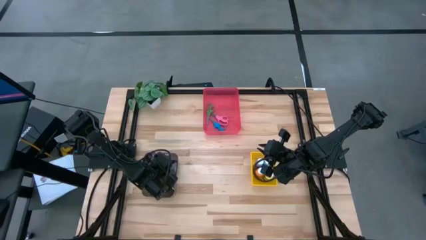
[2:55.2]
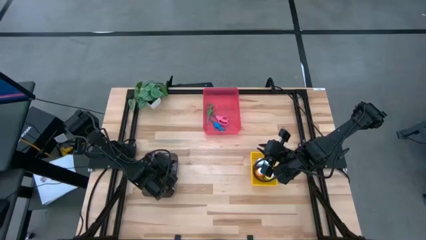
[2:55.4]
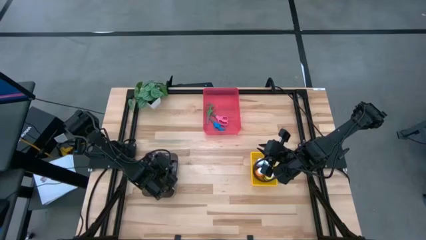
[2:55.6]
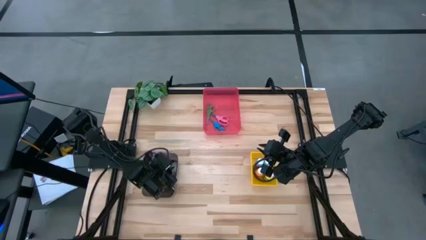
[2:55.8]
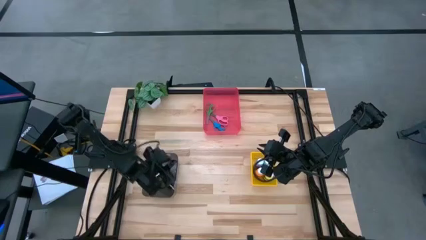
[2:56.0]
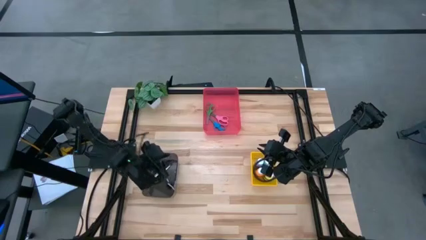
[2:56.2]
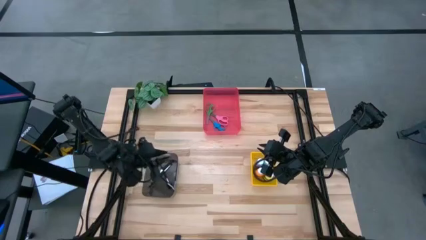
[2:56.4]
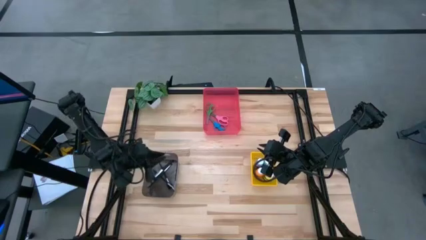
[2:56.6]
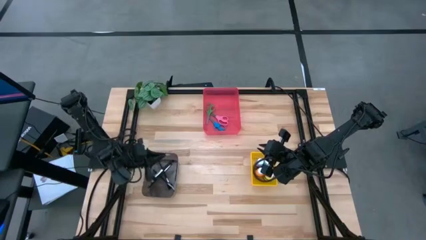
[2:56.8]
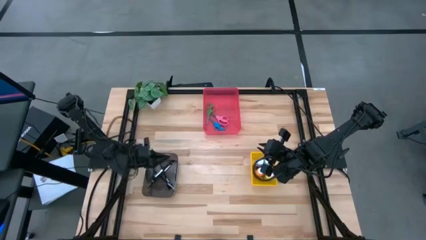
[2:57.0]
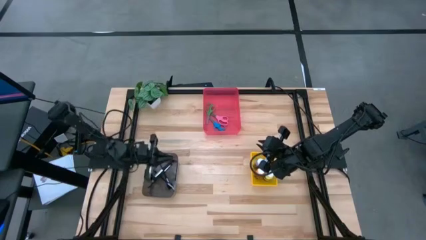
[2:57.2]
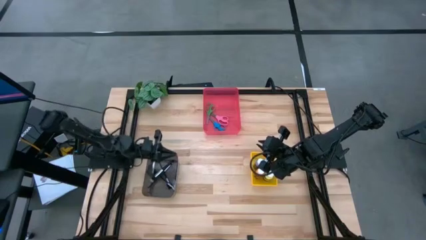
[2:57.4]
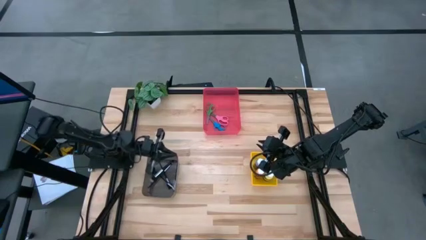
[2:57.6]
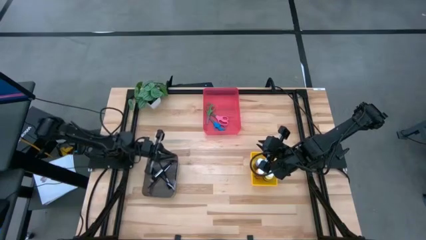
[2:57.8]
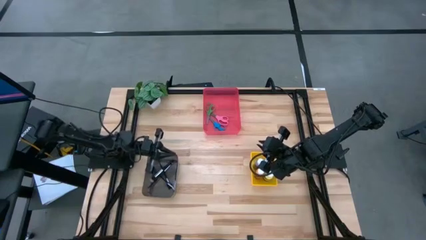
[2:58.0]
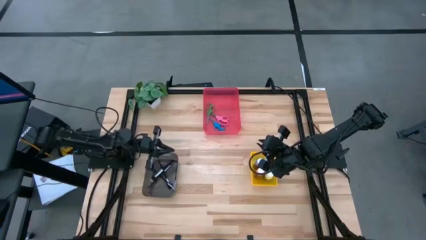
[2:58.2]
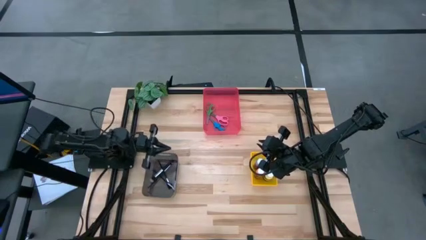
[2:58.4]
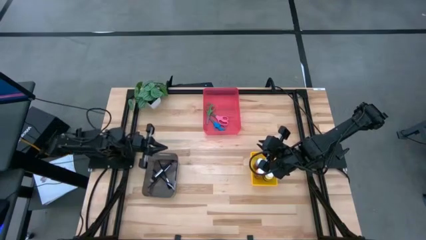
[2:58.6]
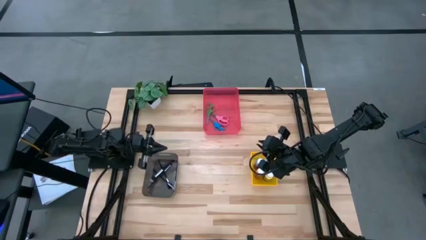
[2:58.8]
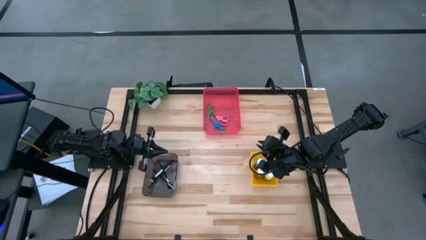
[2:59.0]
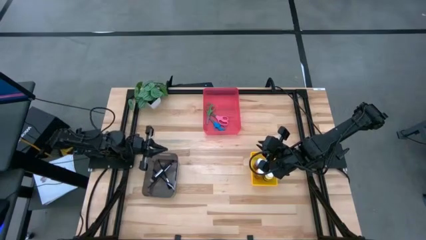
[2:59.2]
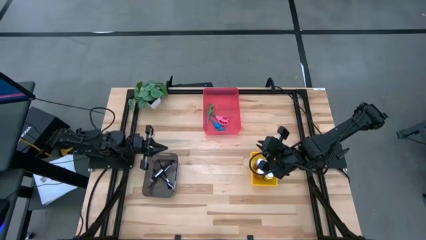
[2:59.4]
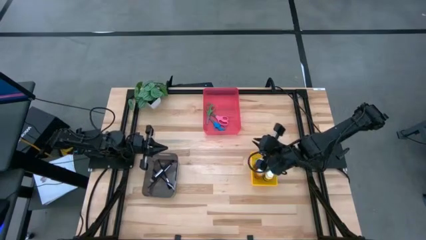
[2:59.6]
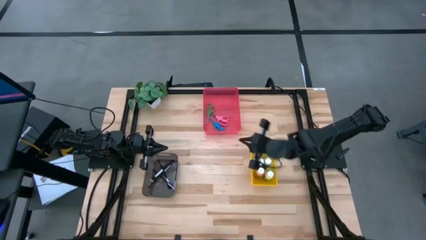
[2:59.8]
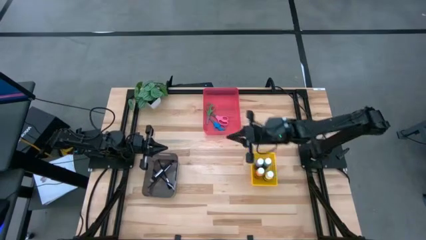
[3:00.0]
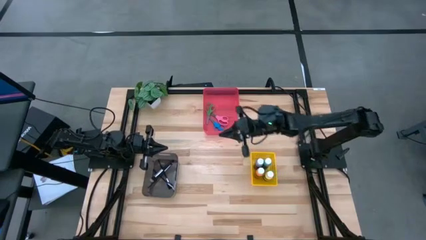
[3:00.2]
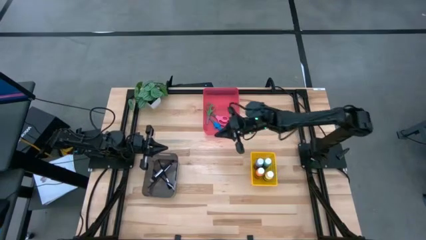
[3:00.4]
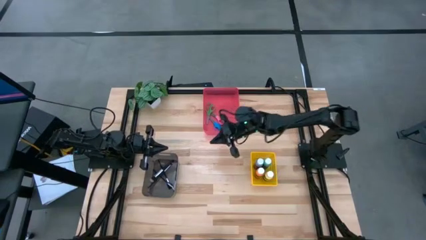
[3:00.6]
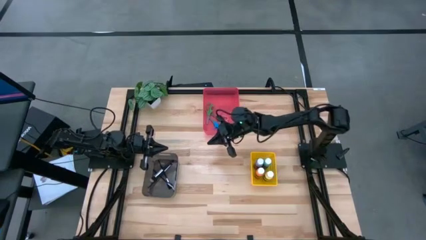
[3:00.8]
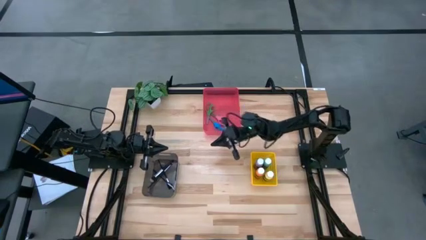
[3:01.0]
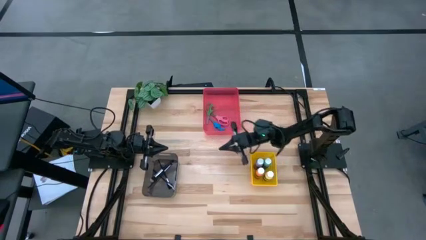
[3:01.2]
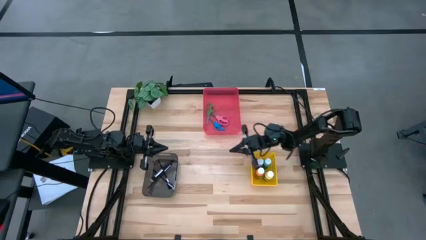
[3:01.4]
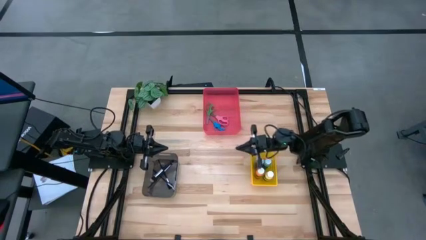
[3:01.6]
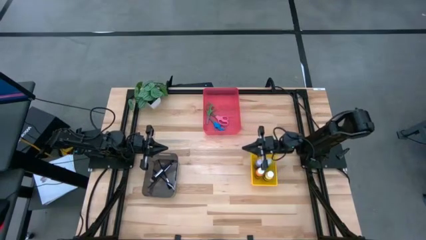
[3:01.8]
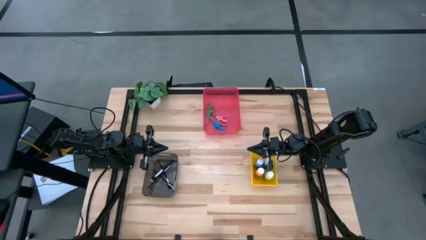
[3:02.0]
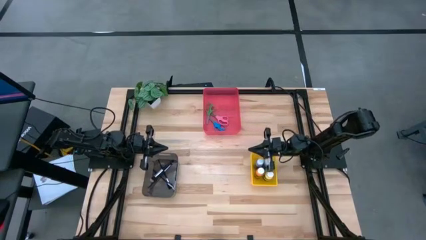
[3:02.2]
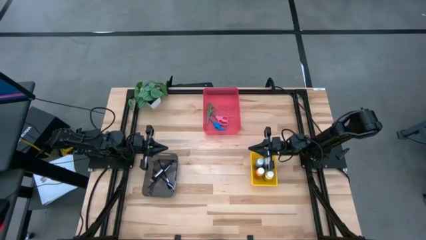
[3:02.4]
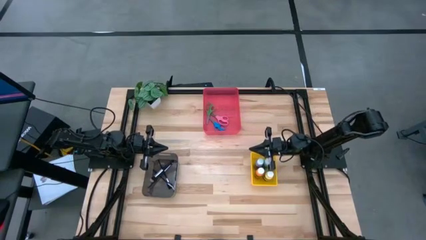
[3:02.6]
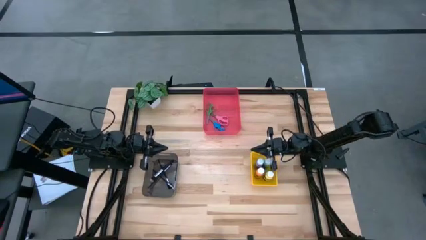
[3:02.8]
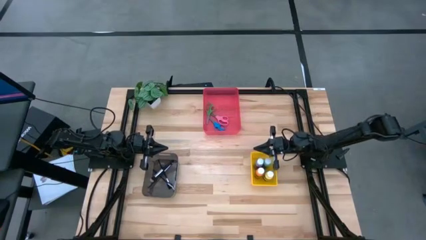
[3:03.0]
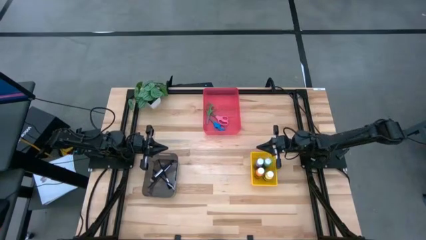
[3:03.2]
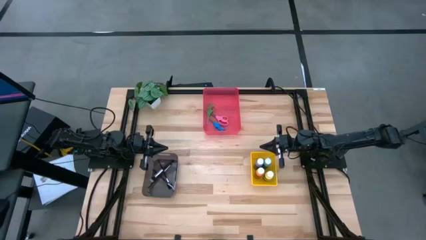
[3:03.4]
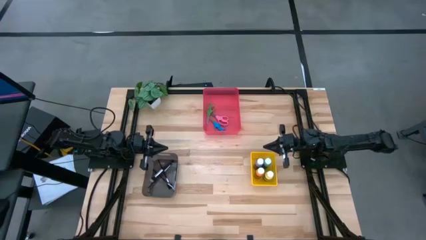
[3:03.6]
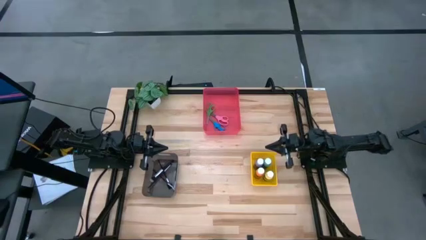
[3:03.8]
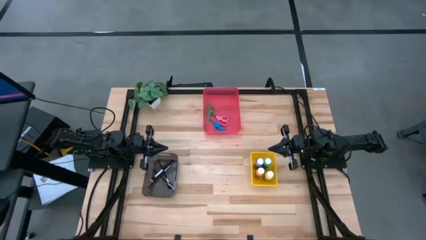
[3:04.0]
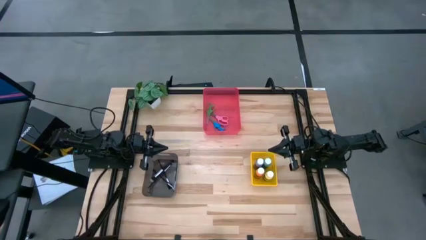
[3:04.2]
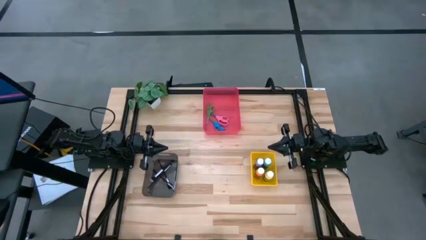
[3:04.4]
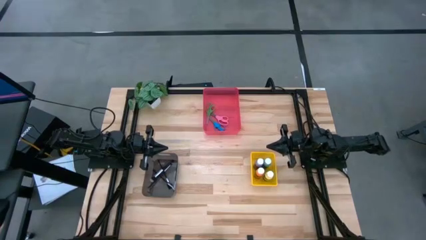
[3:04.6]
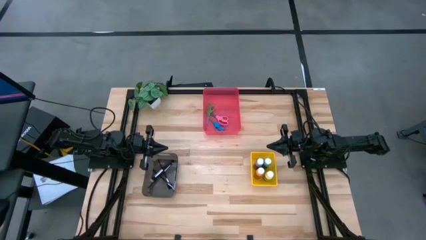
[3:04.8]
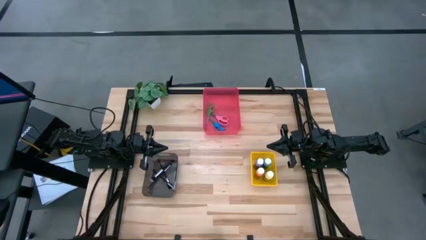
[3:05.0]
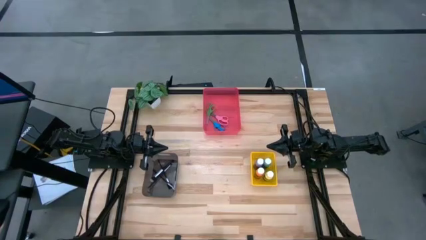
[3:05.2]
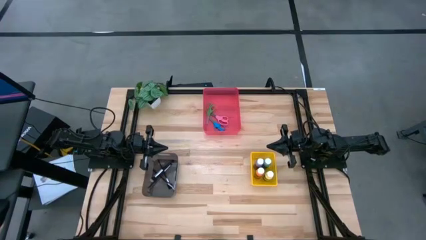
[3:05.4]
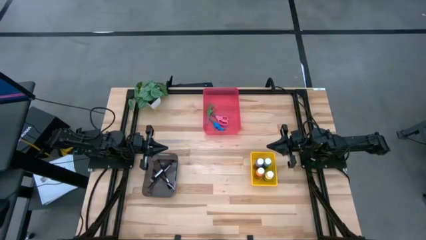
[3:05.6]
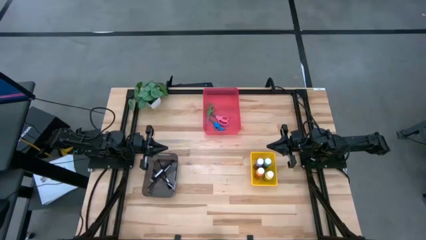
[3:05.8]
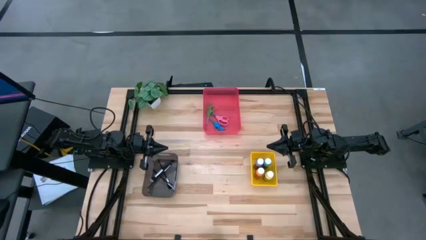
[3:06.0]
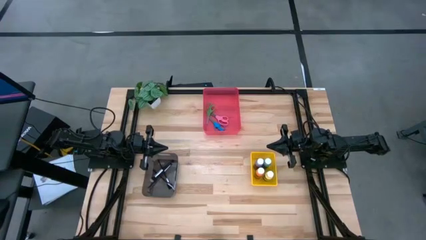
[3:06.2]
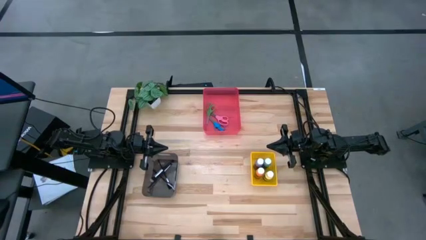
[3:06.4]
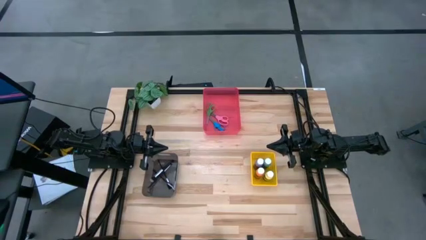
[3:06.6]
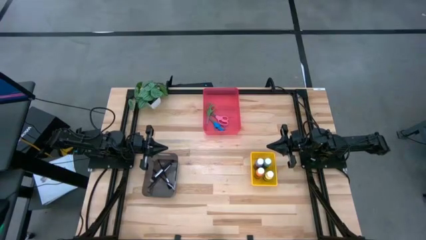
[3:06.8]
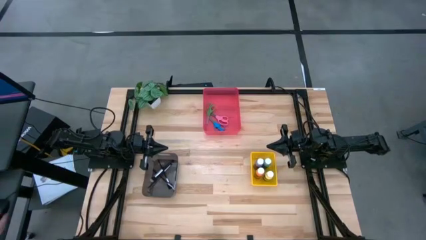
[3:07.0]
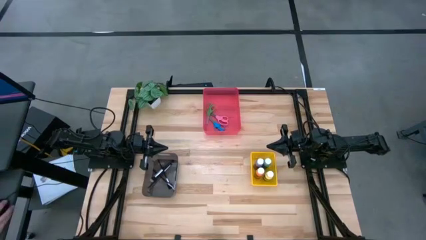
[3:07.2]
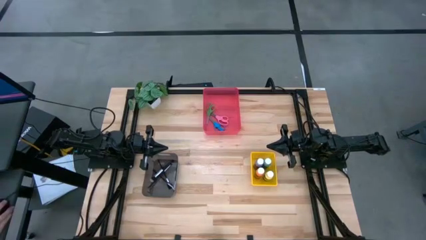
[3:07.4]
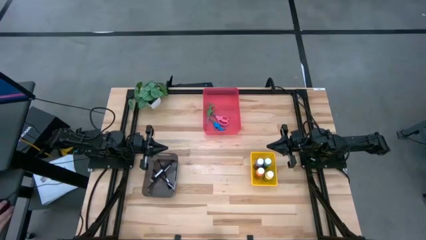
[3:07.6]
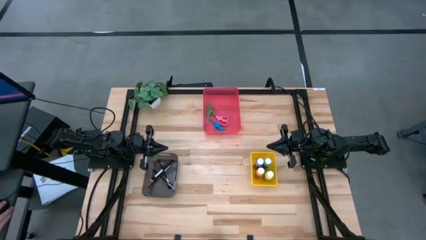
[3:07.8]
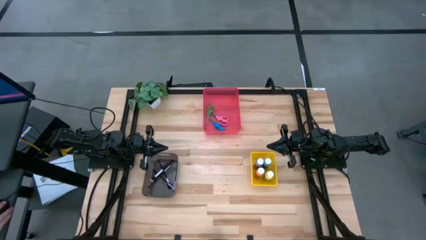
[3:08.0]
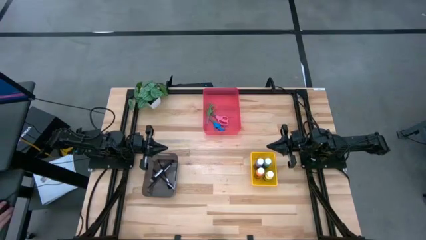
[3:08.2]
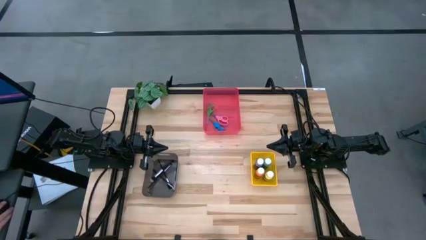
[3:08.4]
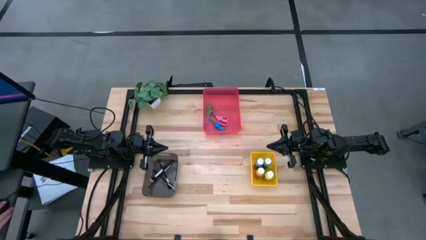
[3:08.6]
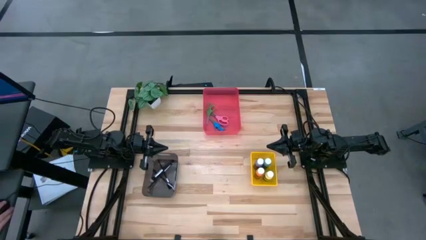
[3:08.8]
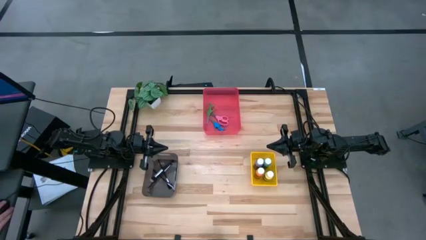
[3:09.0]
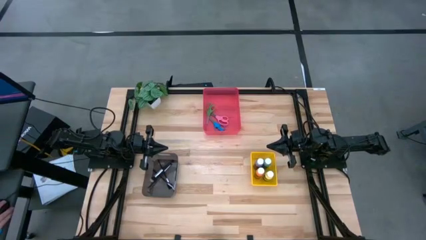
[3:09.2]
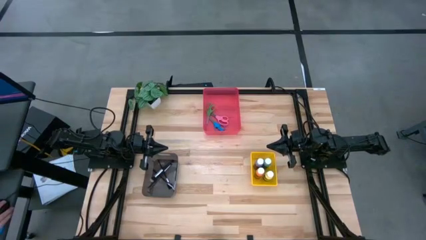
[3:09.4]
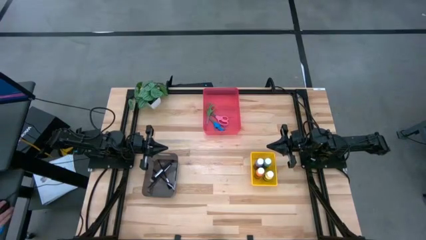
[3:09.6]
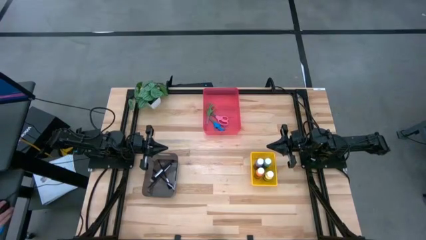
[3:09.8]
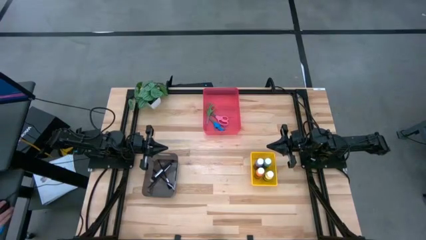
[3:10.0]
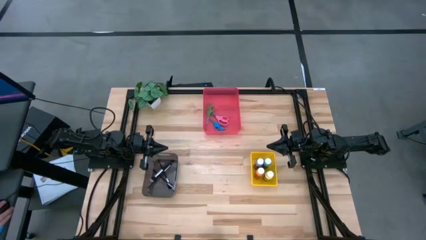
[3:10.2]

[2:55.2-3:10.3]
Task: Pick & Place Paint Supplies
Return to Home Position

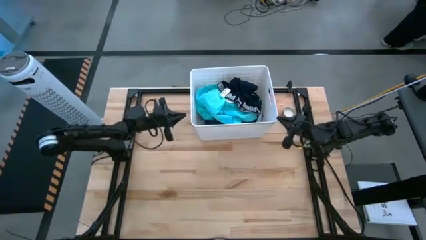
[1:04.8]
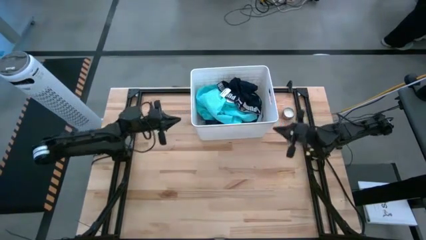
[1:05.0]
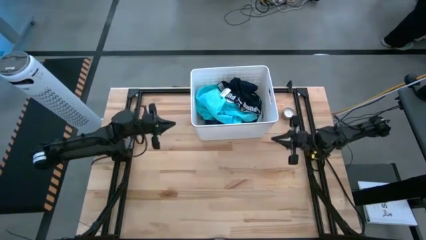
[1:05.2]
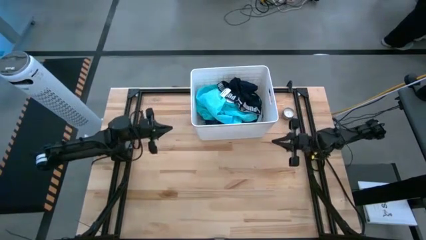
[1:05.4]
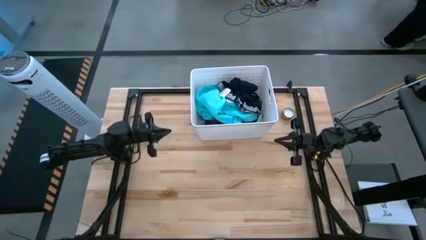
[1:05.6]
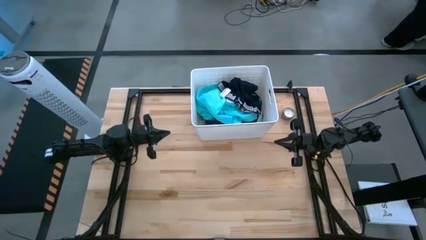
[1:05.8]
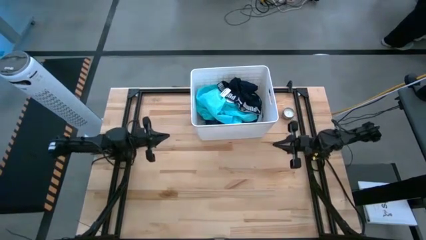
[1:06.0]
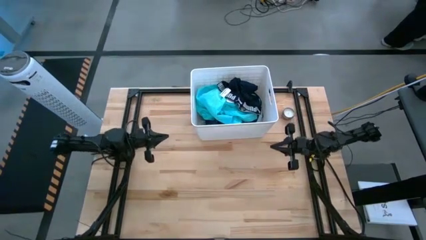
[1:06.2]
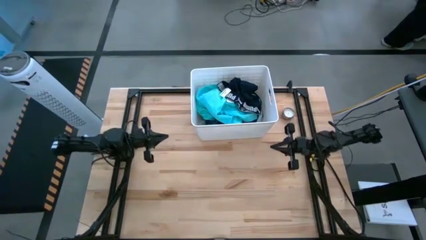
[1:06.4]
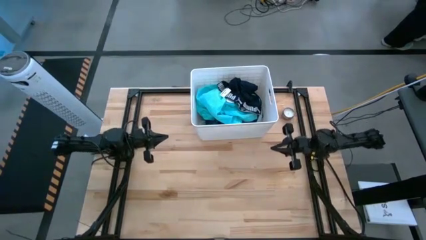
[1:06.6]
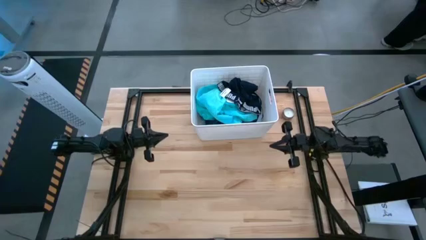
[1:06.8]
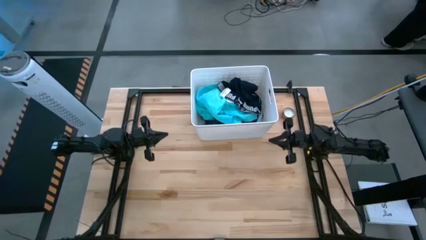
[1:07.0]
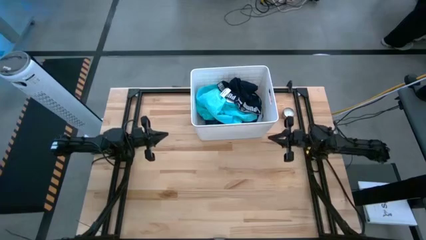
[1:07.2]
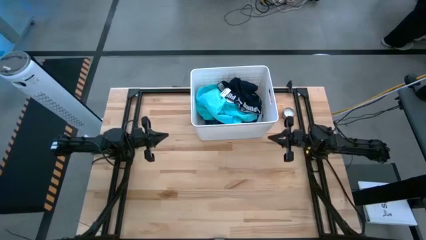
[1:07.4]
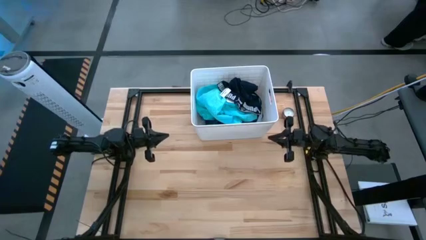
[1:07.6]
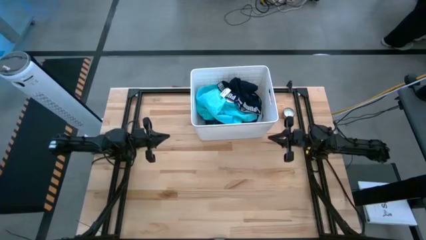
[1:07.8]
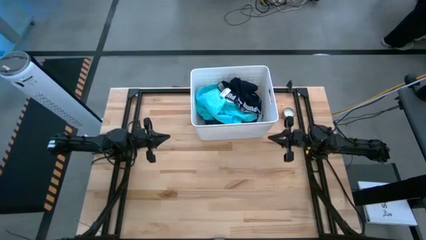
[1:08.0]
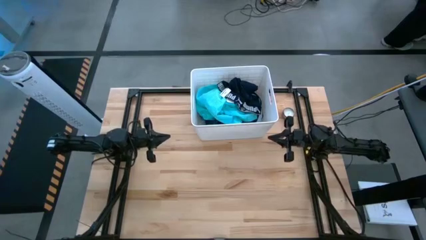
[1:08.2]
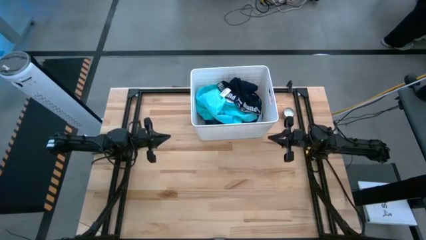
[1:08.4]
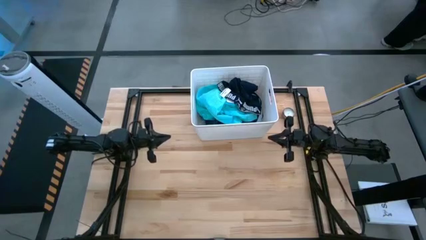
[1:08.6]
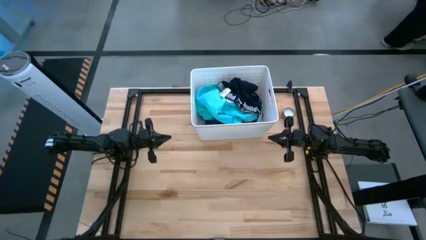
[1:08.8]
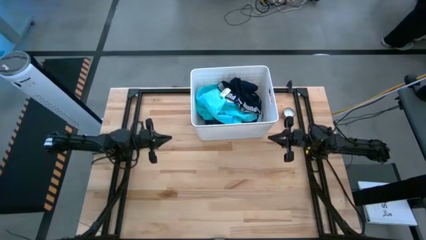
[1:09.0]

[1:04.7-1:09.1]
Task: Sort clothes
Return to Home Position
